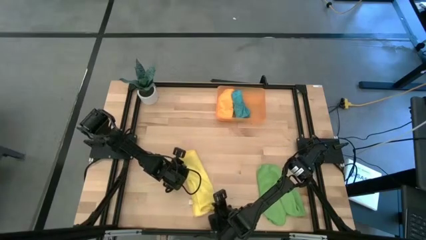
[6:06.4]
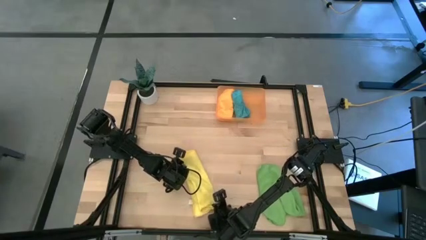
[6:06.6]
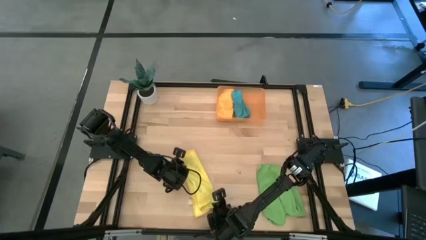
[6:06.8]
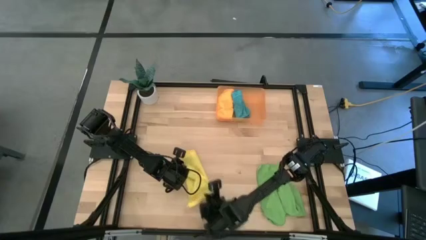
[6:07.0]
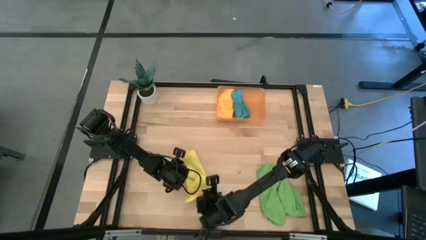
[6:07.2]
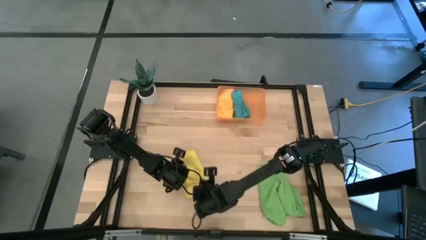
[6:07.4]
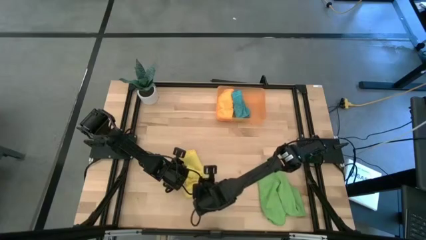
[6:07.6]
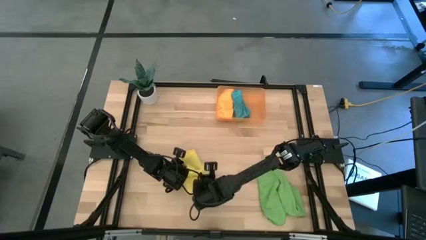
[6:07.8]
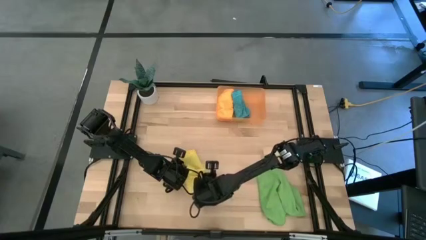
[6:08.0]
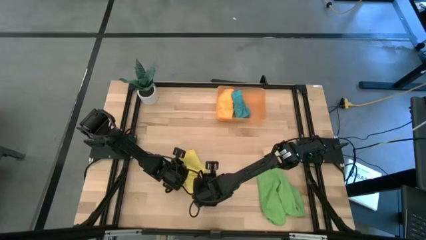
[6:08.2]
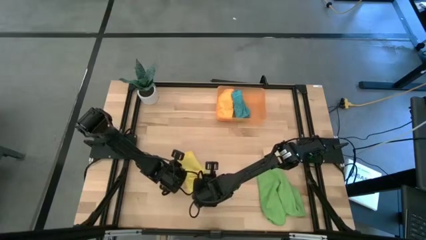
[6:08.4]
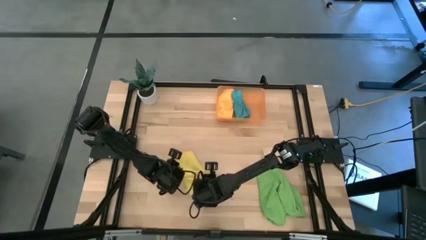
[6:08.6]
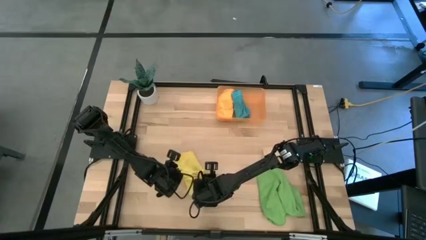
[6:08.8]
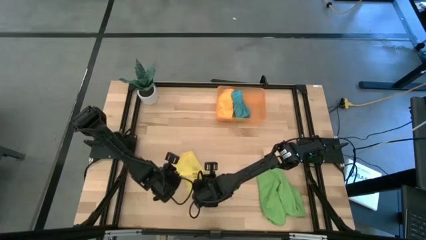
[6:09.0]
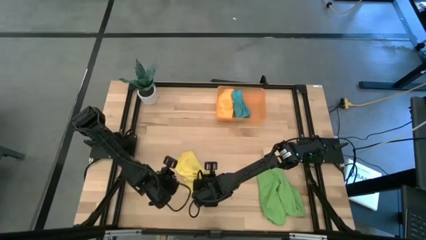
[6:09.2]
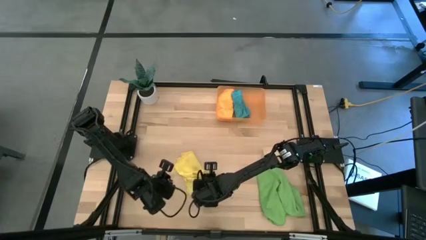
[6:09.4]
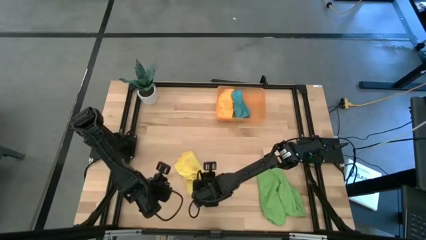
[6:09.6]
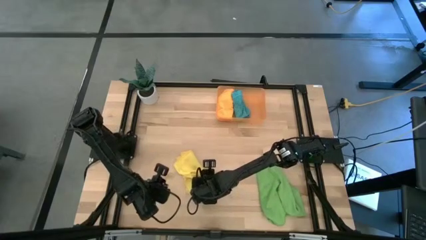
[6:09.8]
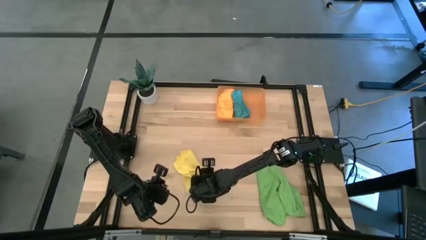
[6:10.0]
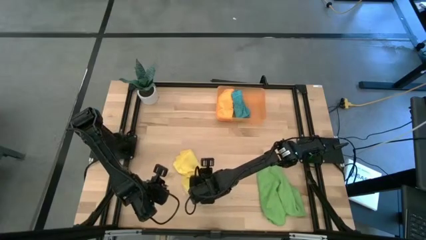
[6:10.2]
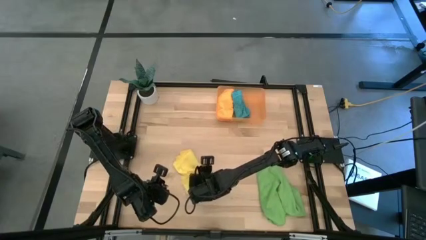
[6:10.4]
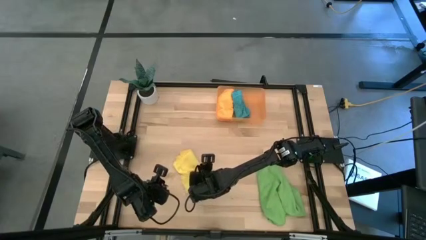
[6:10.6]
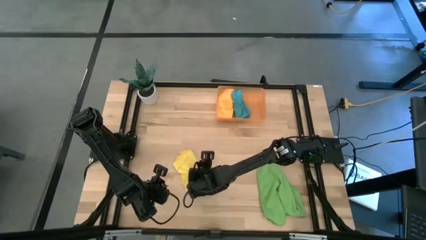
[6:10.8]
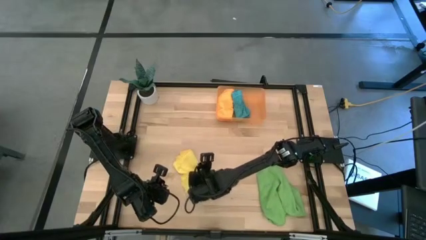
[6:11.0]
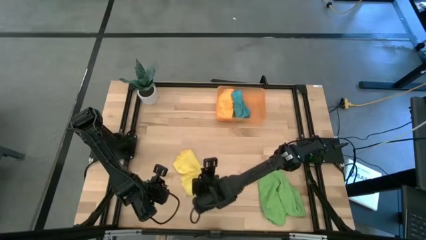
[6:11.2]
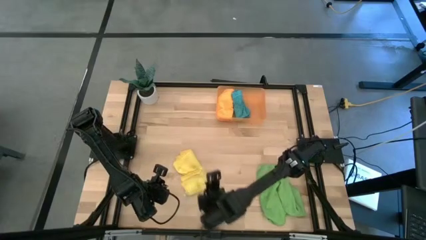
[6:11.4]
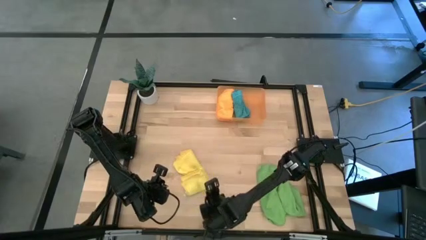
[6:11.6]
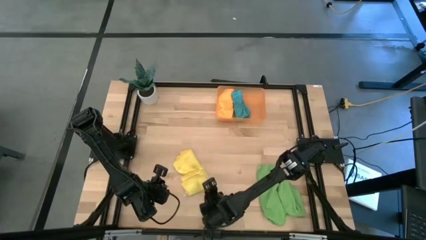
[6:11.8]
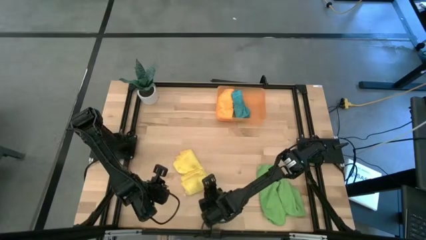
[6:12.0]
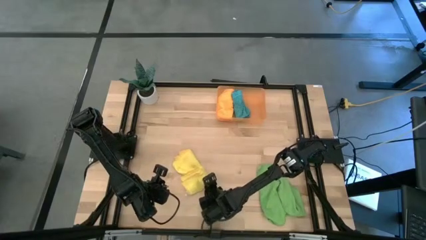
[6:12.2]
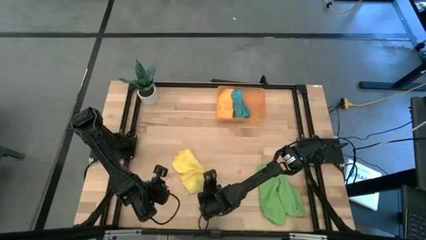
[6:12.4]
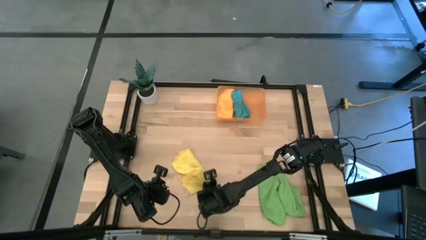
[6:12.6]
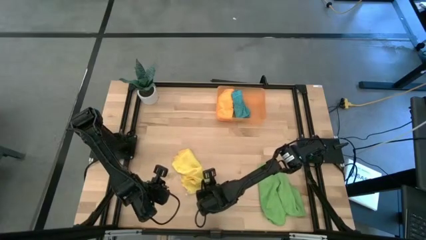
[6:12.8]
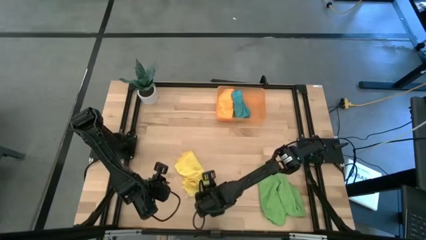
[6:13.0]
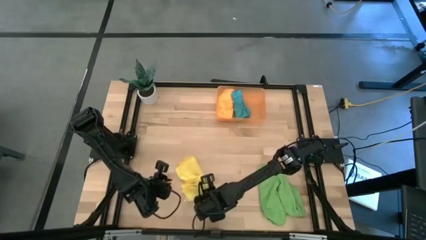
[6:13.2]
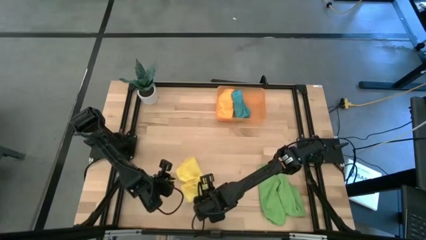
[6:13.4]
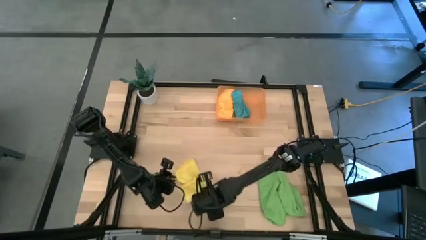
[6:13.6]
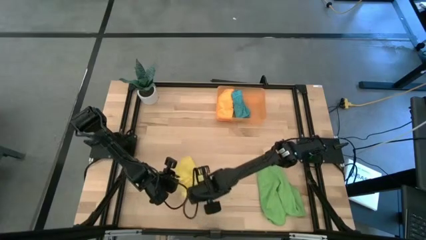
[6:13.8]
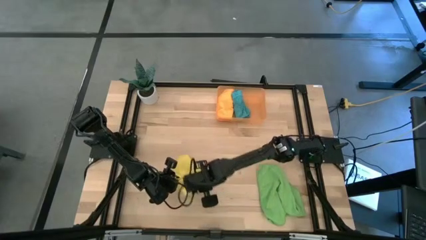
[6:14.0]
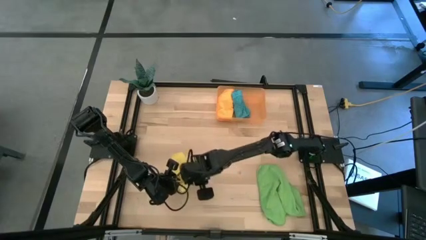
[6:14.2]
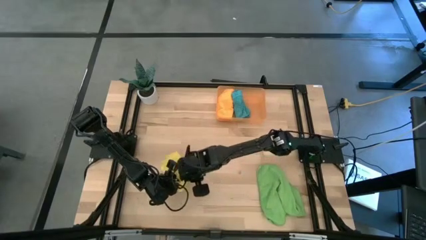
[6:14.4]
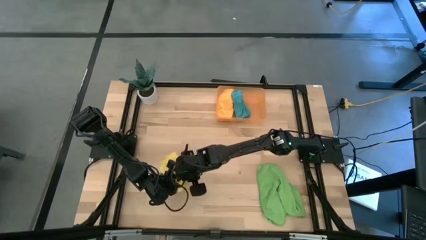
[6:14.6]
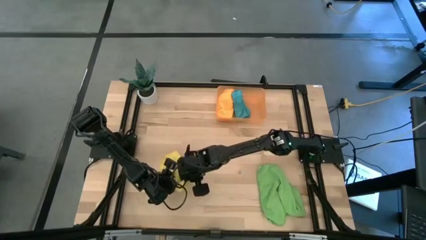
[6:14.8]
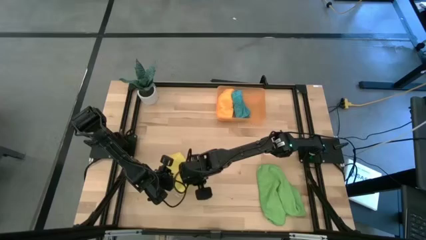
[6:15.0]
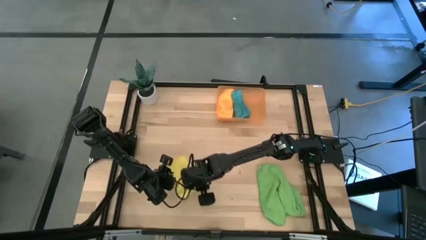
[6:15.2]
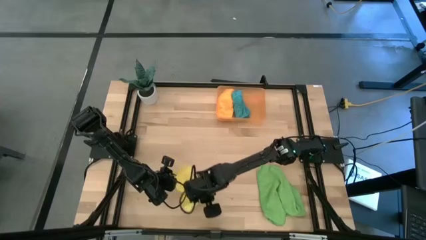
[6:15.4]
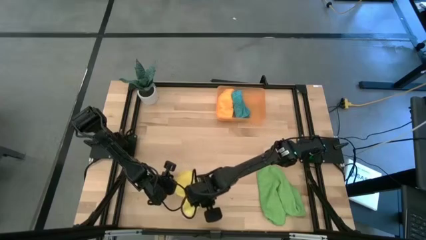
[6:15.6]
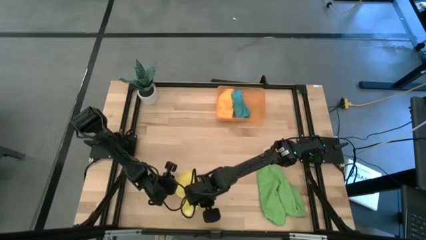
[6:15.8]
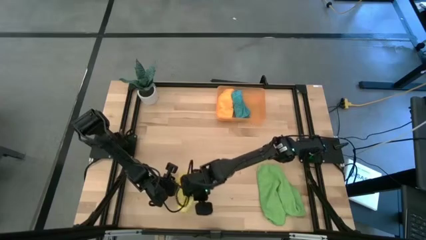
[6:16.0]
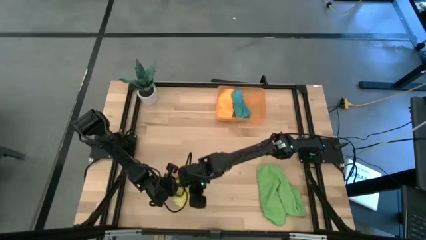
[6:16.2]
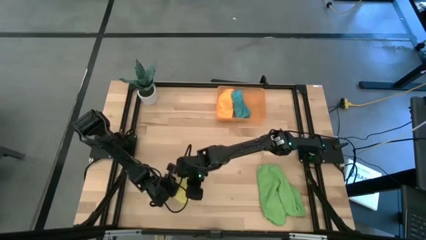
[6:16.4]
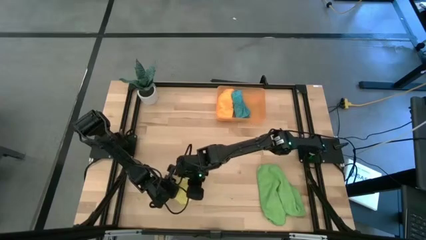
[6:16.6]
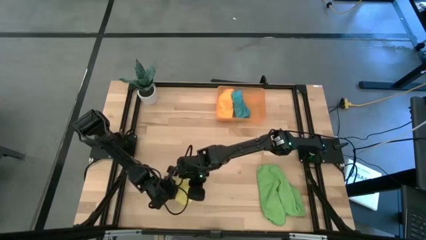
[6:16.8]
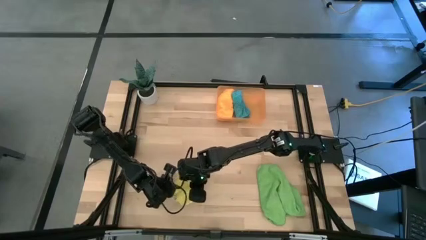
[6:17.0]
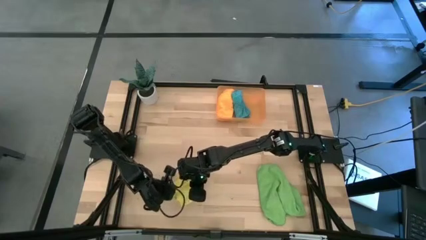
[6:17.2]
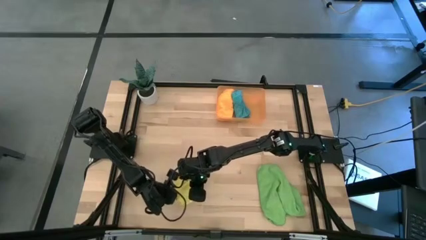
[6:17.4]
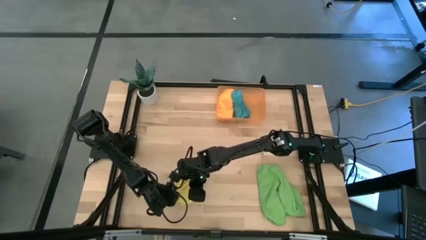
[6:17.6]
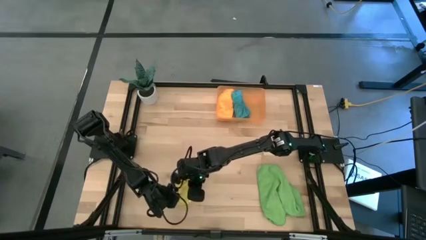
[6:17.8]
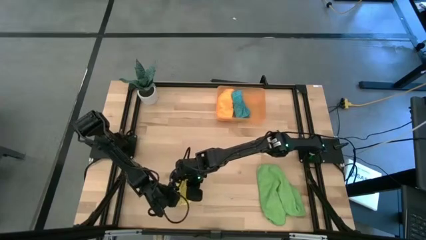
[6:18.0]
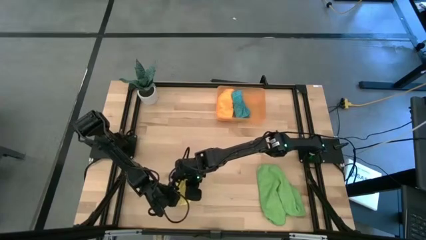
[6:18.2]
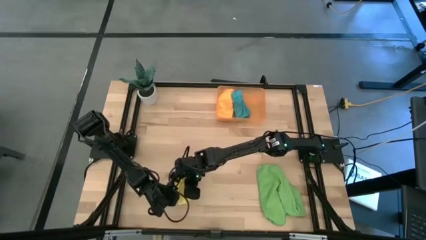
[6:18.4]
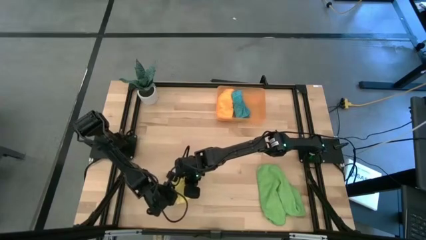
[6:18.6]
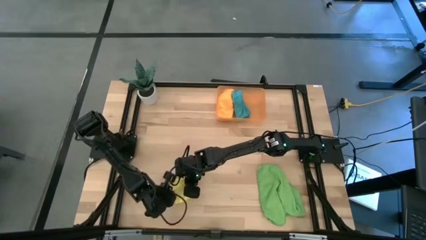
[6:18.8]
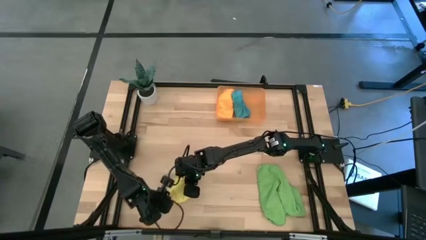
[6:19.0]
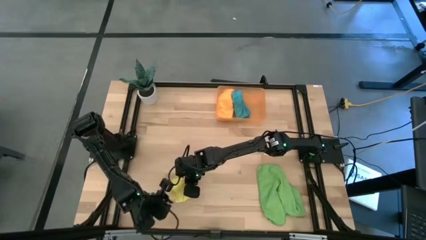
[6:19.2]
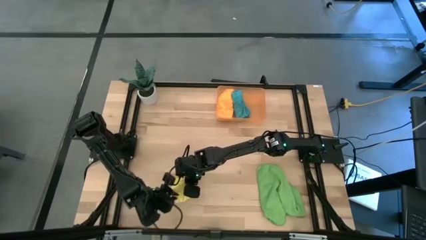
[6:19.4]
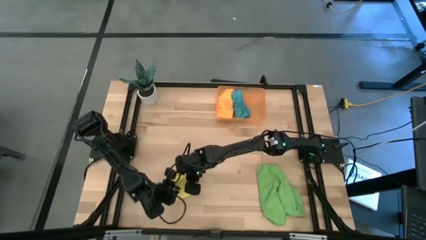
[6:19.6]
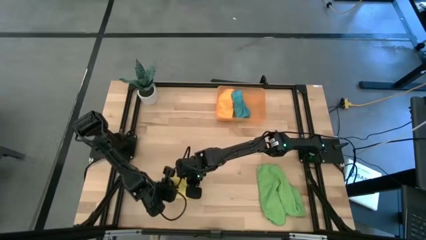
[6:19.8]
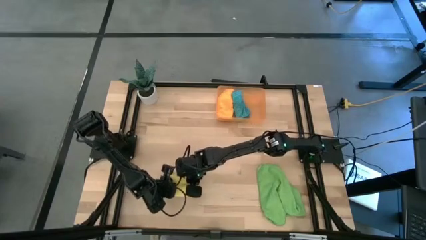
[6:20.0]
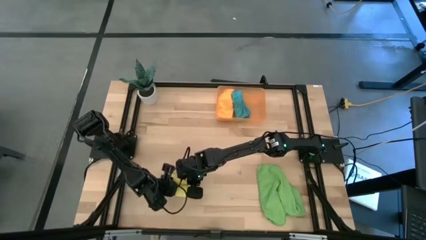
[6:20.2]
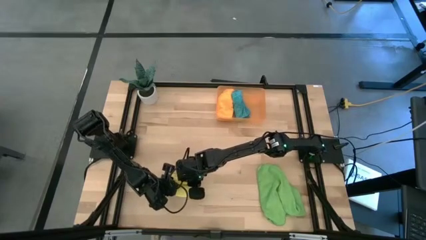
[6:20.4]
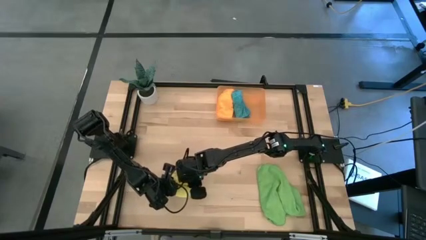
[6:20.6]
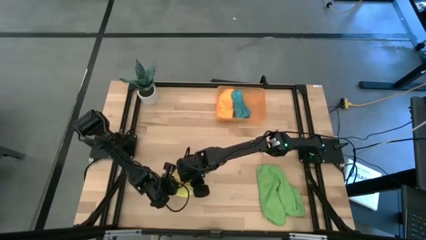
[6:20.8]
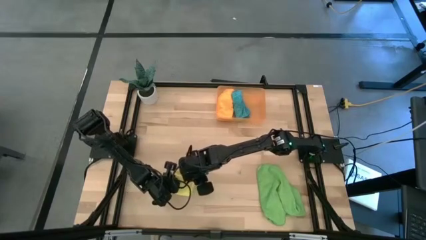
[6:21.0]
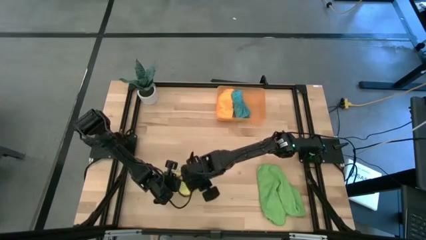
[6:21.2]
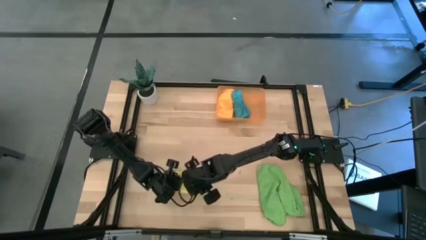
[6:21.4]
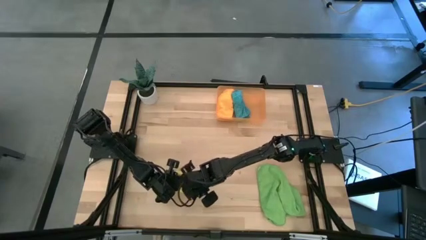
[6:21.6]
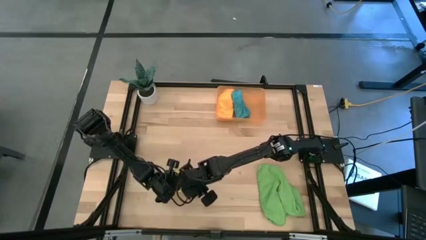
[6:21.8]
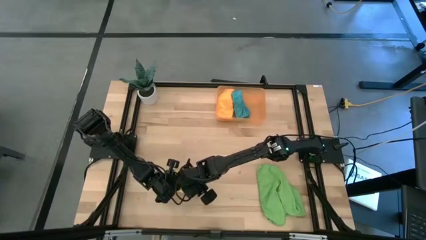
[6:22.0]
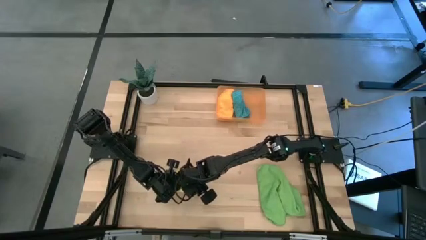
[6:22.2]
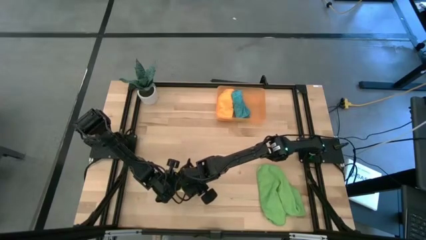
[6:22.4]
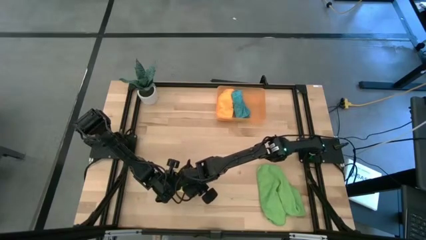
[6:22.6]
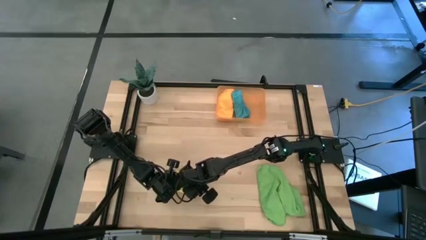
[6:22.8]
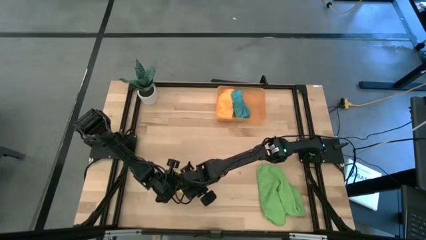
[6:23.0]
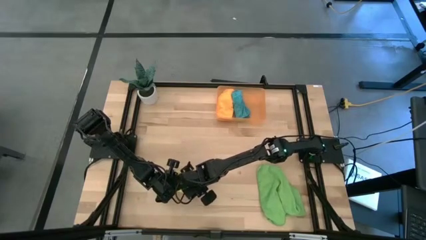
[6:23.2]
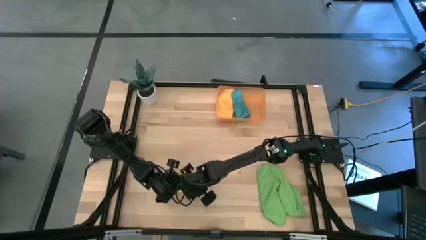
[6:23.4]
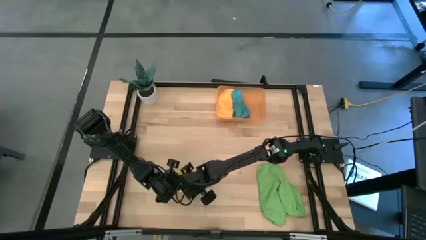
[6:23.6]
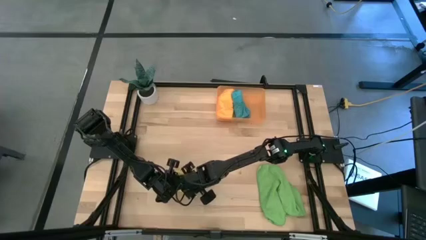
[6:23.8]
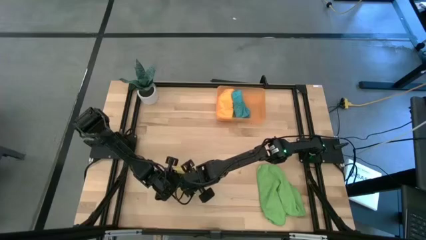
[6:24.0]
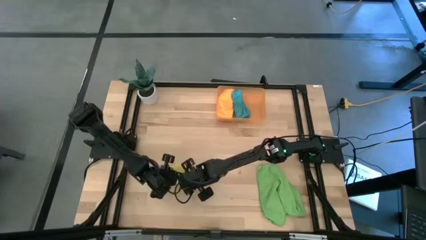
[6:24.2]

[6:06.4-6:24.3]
Task: Roll microfiber towels into tight, uniform cylinder then place into a basket
Roll the yellow microfiber towel
